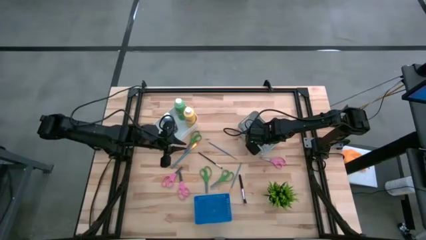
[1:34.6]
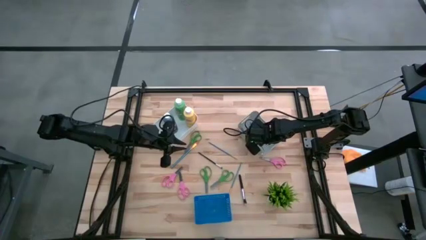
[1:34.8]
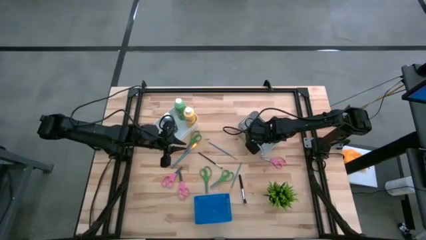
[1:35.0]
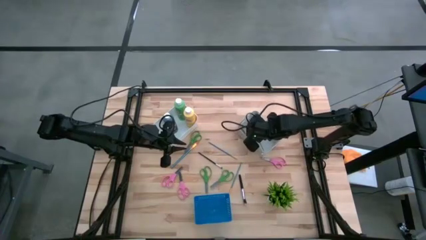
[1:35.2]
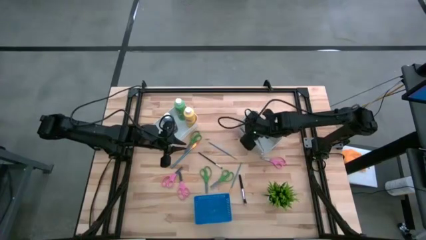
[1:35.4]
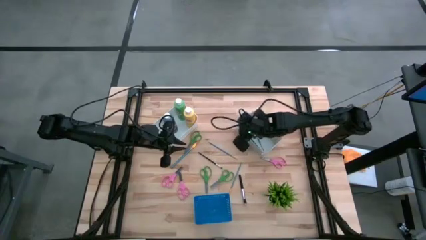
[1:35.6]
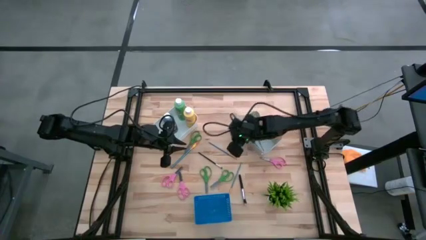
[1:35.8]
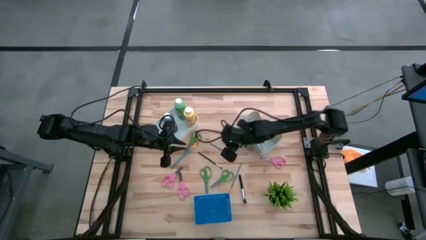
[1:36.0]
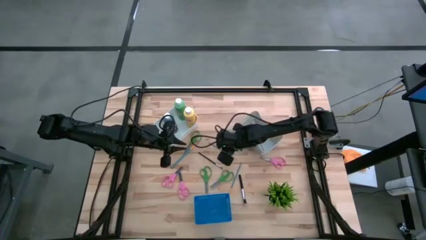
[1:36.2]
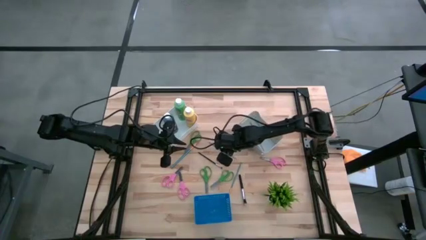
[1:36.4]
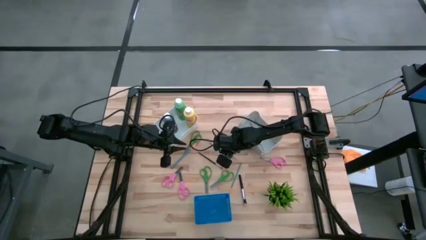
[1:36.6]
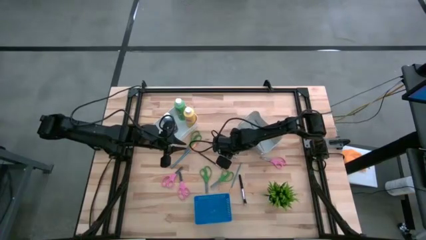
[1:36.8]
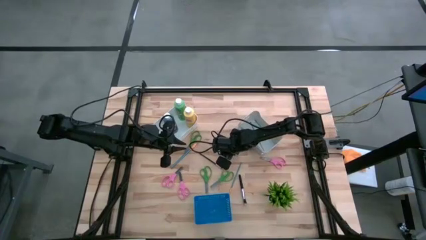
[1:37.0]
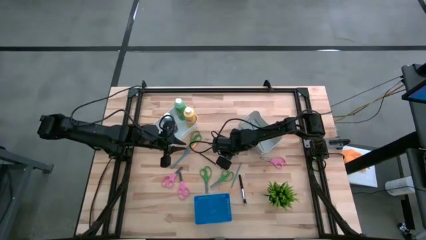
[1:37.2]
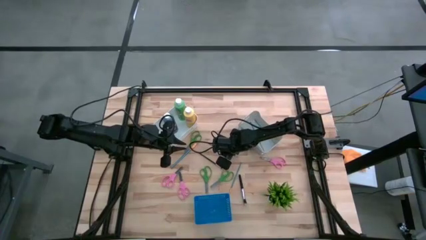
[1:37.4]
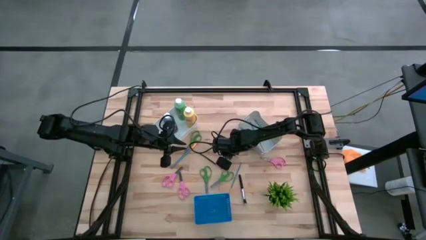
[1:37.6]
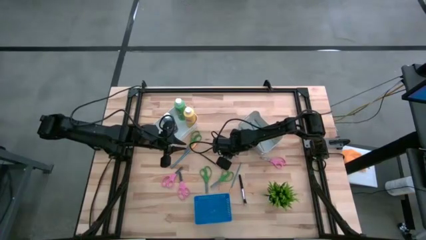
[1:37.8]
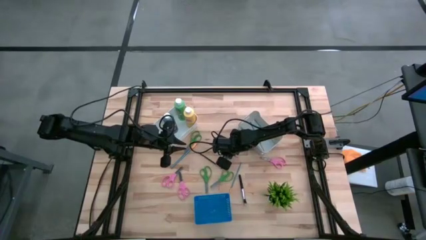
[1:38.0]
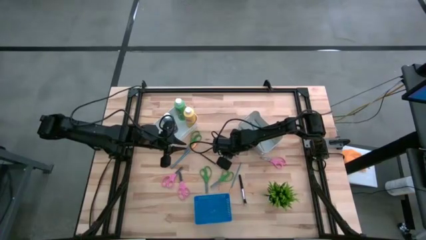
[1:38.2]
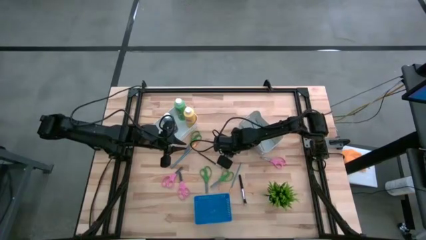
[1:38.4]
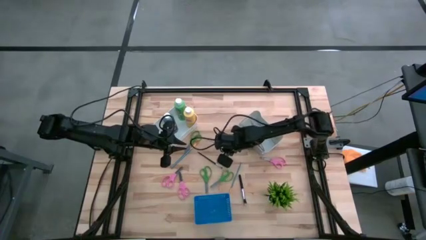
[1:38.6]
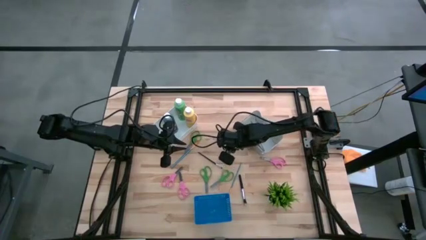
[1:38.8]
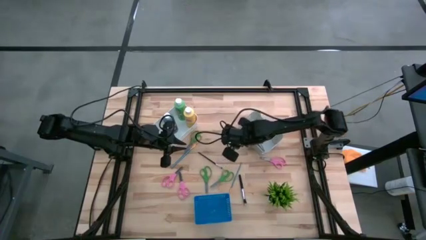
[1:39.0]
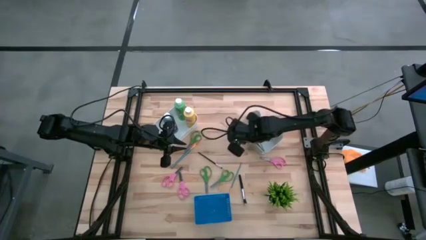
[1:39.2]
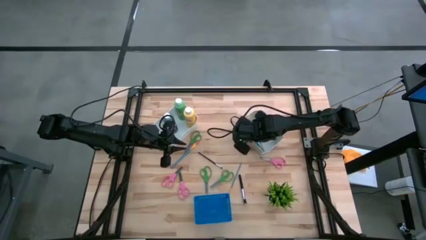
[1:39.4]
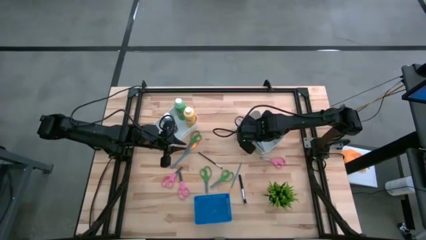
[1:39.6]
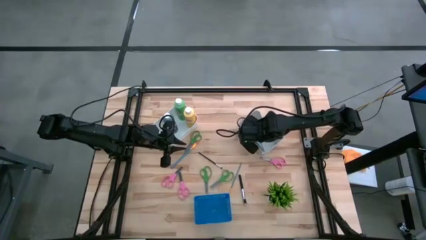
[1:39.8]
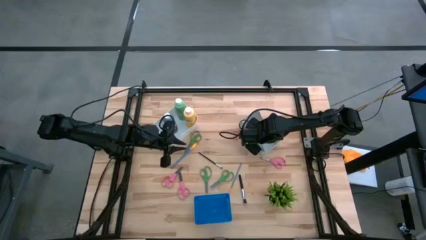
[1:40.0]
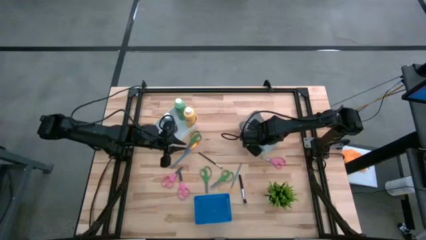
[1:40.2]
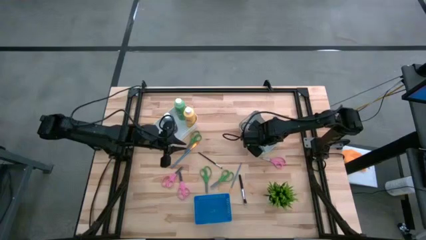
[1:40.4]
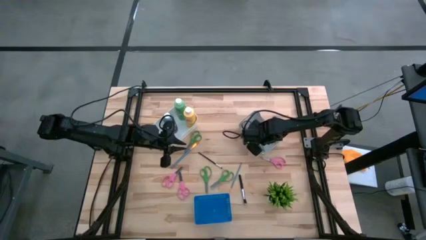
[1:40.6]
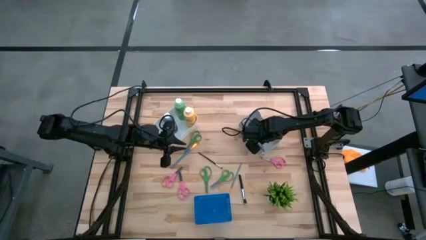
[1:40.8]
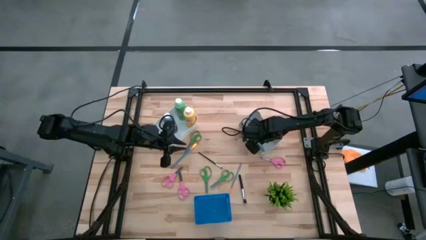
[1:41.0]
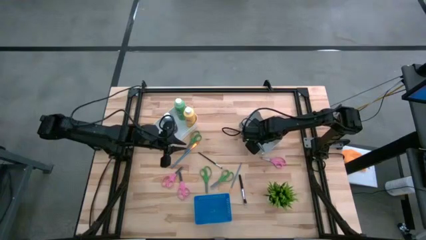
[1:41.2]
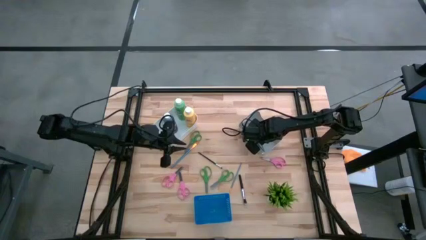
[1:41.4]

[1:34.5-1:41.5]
Task: Pick & Place Paint Supplies
Put the blue paintbrush into the gray bin

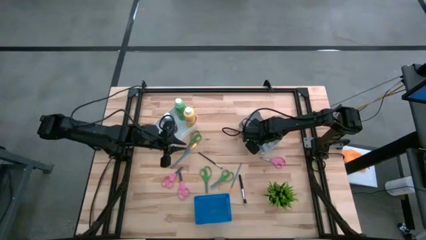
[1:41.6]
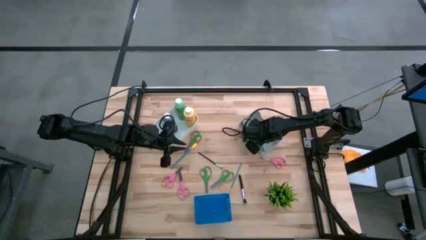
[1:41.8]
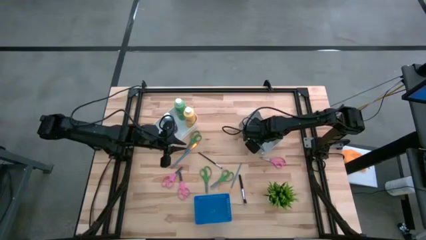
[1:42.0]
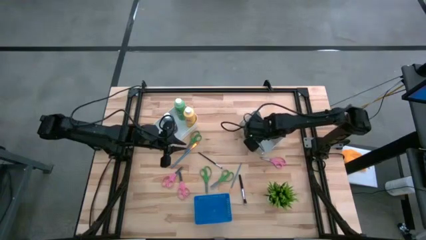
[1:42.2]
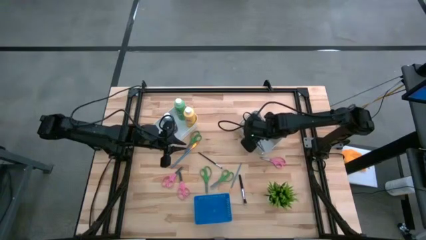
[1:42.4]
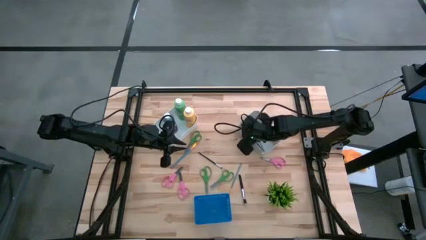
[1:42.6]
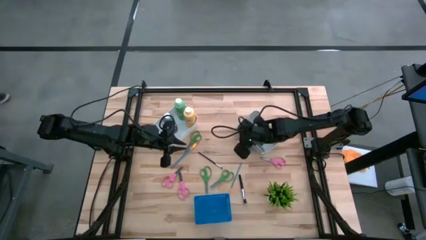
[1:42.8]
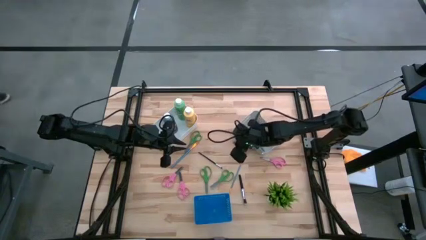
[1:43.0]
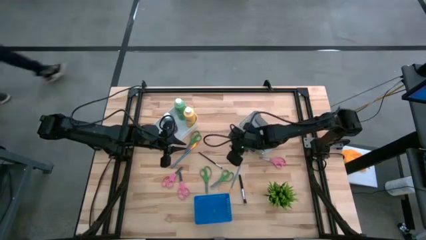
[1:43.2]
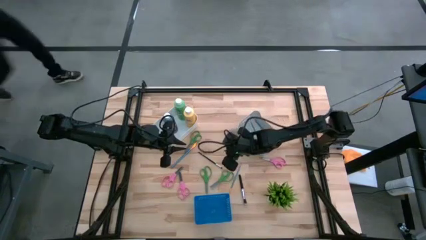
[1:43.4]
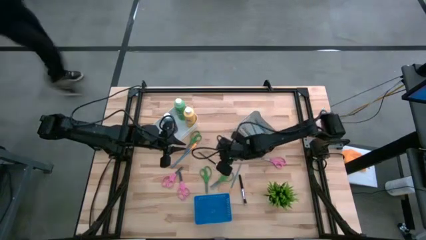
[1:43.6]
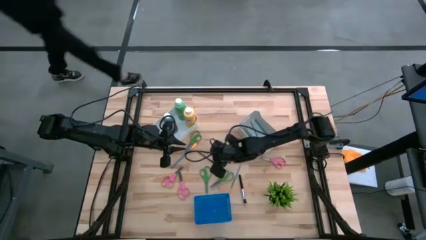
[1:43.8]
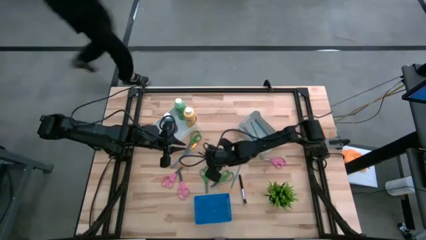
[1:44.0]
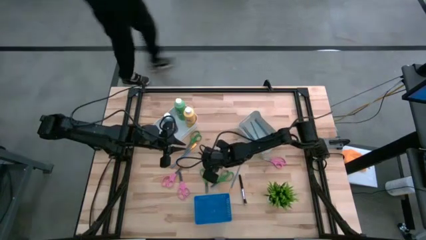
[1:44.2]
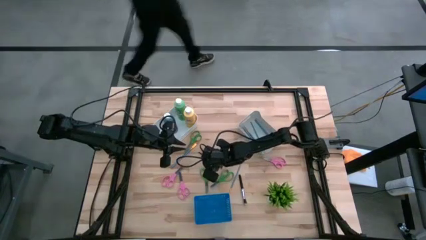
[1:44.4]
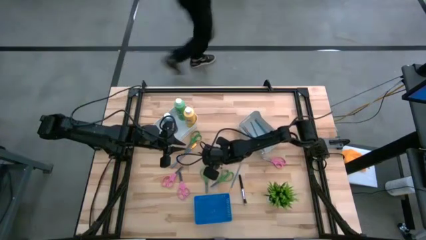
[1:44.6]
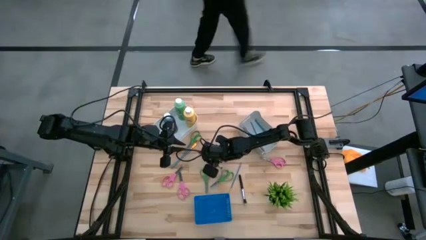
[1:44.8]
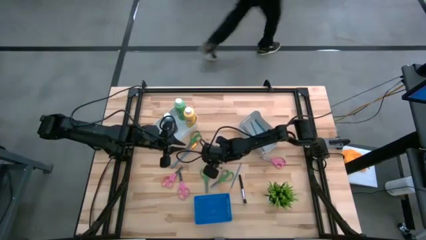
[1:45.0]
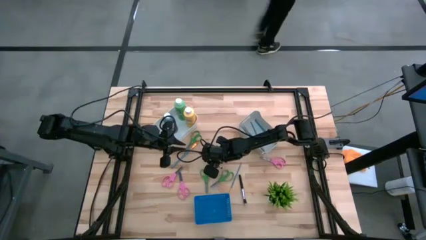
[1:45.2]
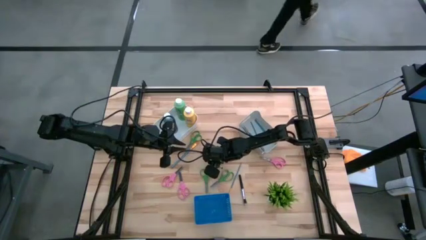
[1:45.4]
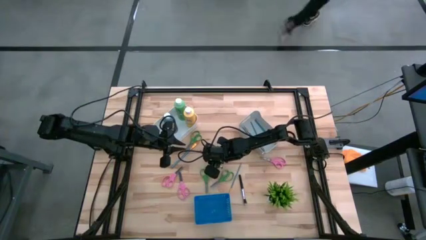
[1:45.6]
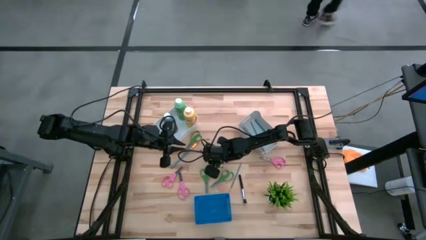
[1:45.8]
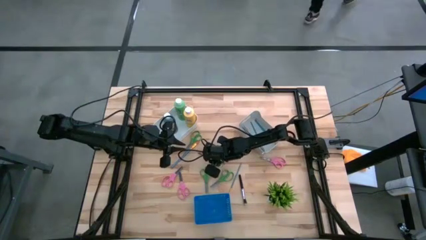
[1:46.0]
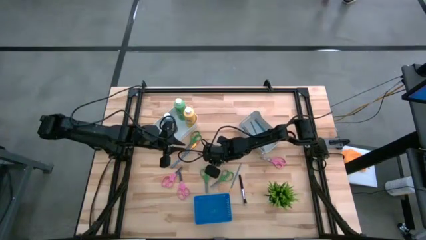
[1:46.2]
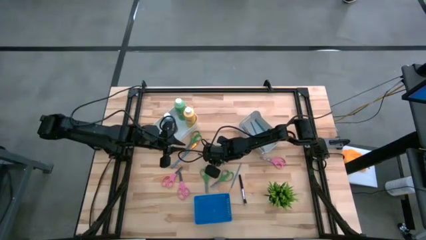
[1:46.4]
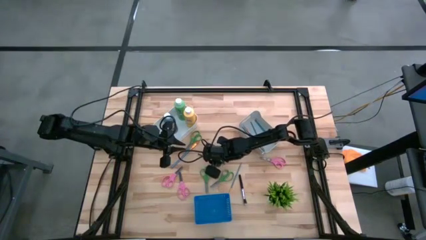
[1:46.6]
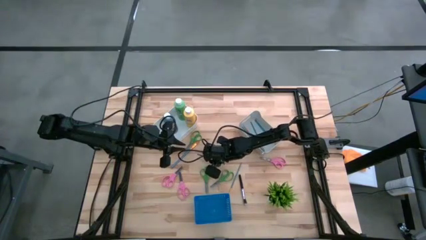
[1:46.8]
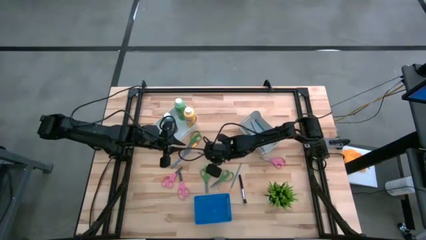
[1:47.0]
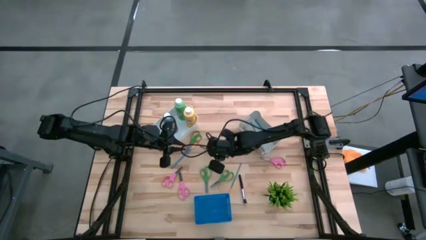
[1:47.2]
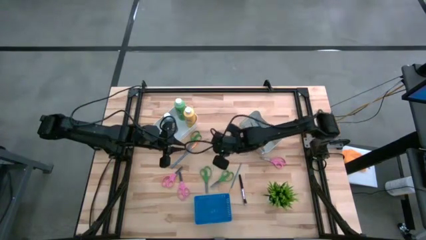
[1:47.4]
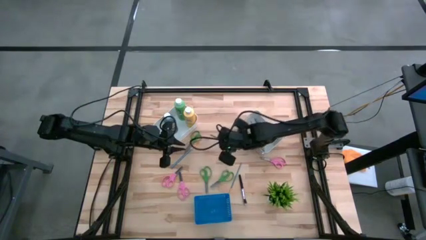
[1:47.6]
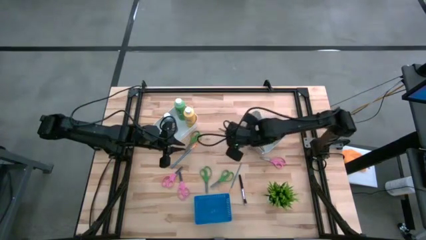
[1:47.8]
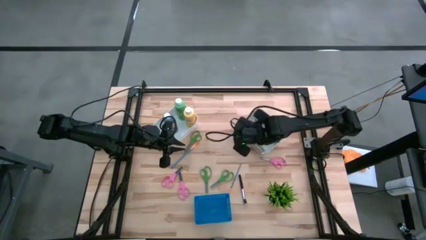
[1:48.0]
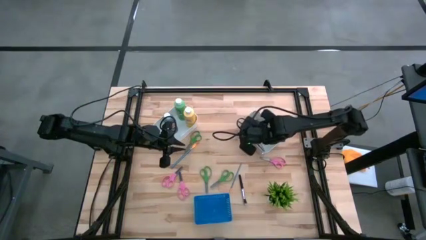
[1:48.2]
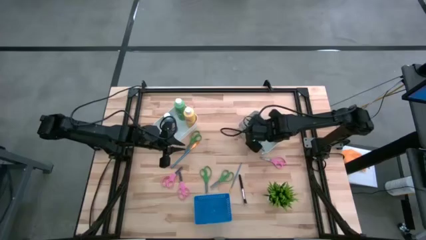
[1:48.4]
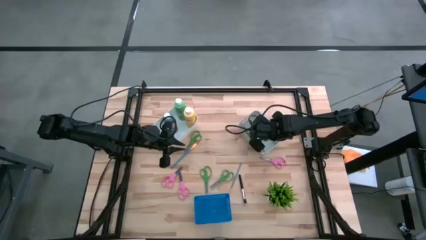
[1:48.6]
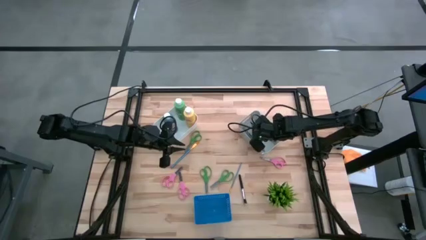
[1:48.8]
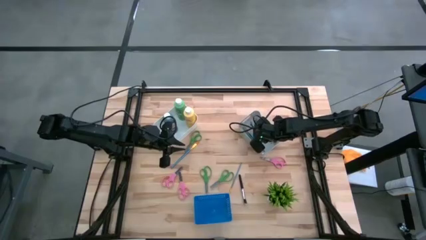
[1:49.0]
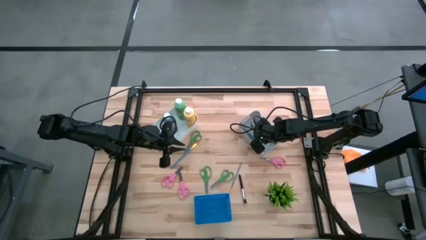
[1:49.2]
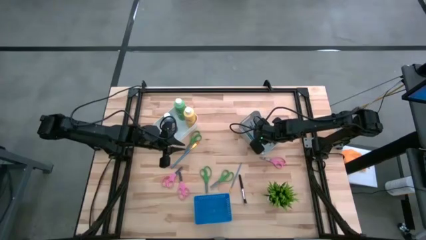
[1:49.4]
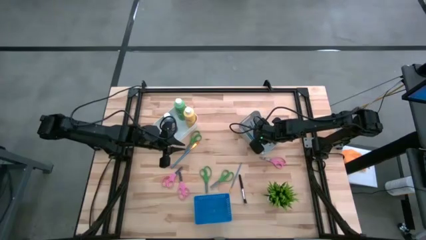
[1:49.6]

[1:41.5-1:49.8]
Put the black paintbrush into the gray bin

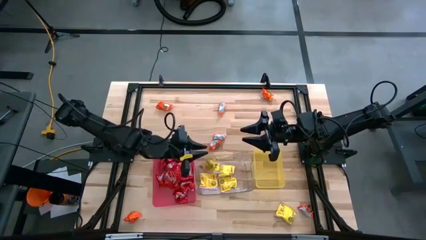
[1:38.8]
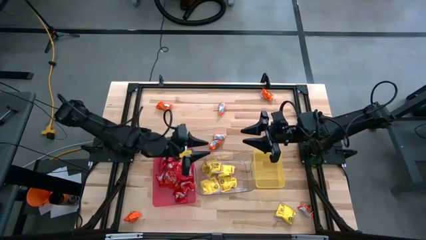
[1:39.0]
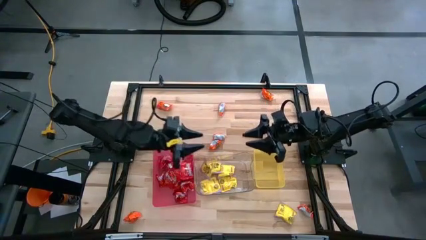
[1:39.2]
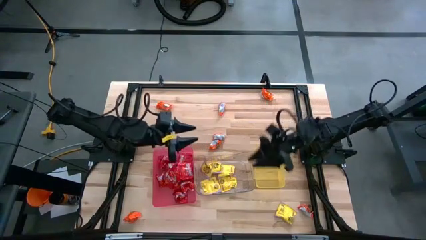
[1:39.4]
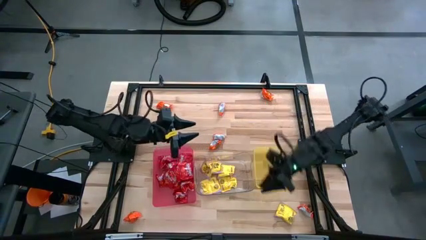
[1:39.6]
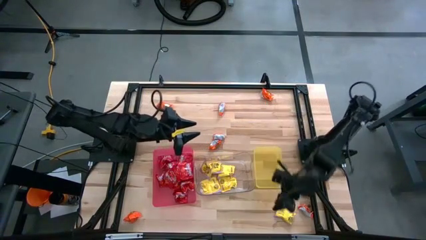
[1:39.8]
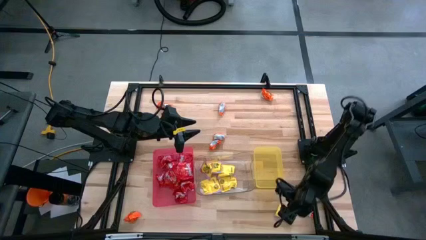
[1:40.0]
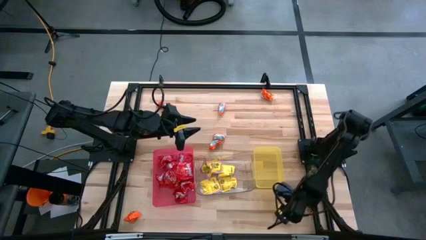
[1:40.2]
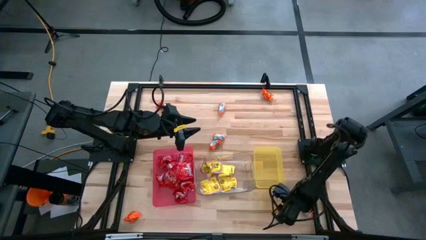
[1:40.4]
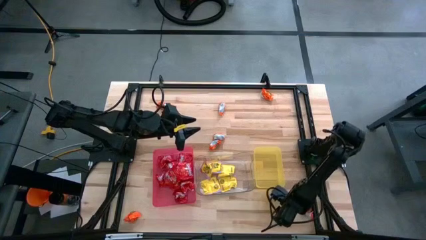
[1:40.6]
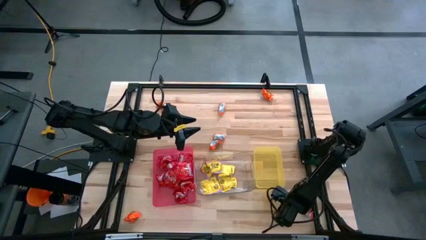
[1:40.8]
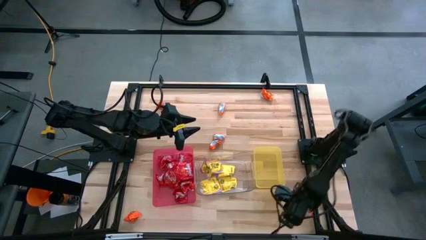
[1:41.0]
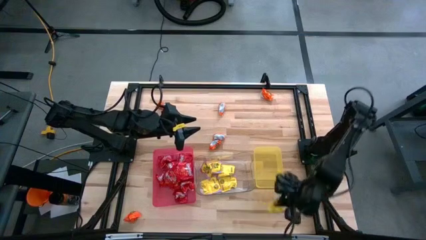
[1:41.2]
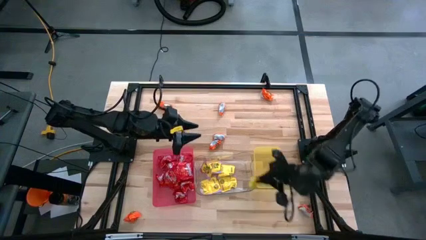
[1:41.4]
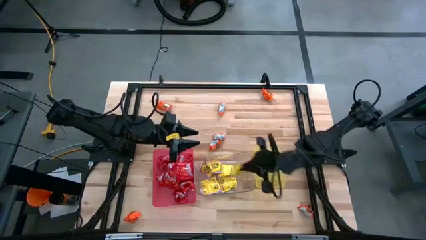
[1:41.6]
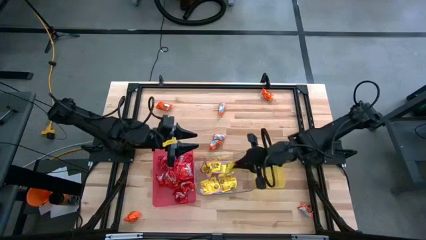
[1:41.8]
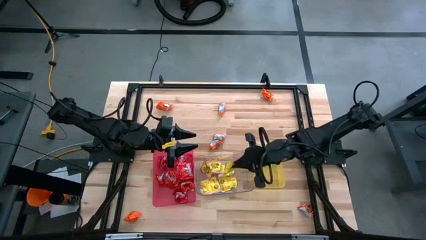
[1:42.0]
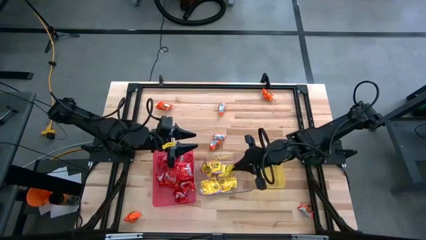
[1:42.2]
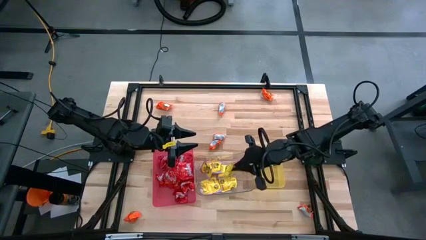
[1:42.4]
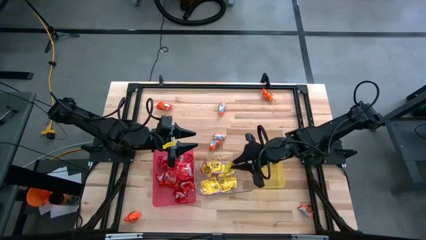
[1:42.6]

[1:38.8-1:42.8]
Task: Sort candy
Put the yellow candy into the transparent bin
